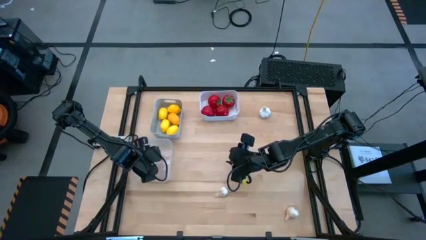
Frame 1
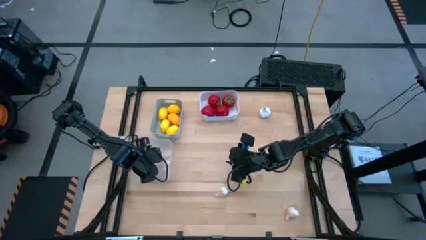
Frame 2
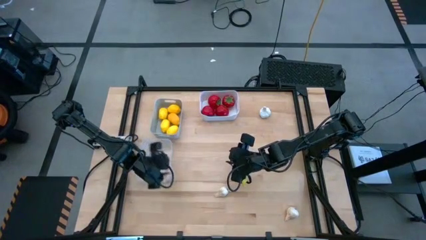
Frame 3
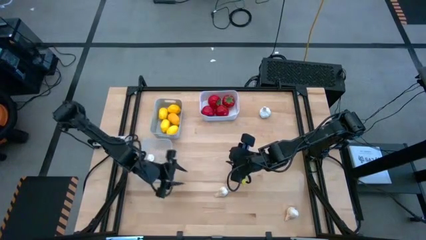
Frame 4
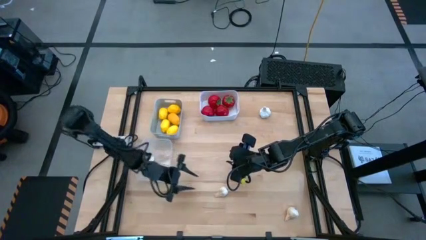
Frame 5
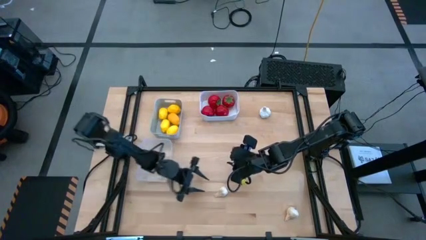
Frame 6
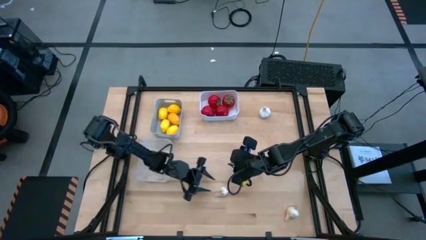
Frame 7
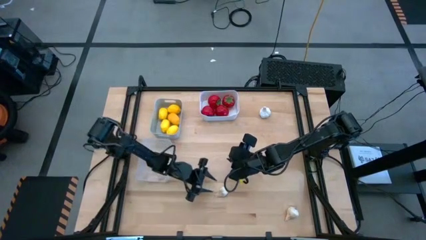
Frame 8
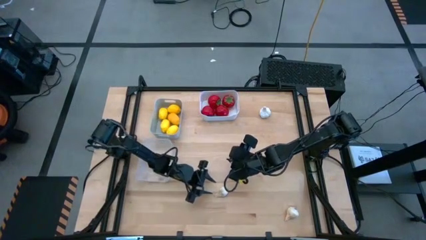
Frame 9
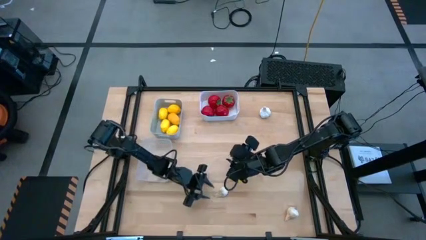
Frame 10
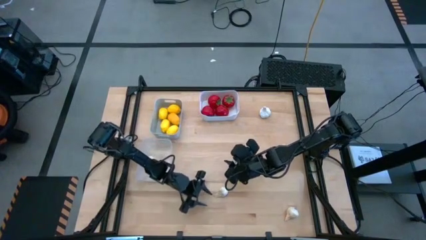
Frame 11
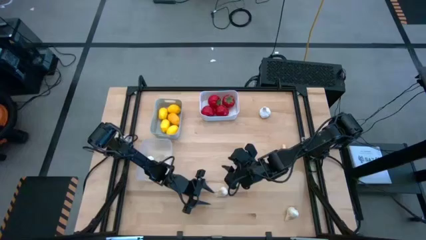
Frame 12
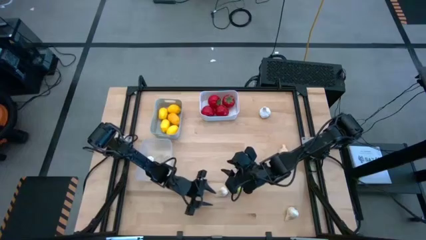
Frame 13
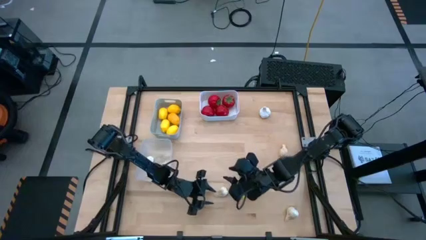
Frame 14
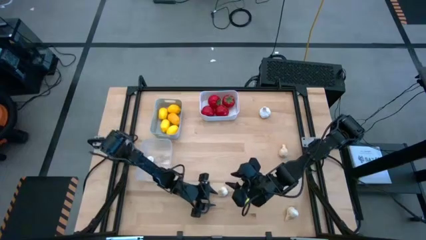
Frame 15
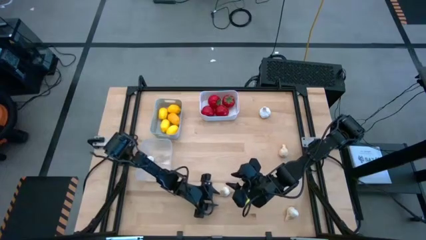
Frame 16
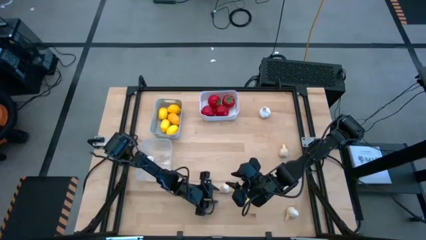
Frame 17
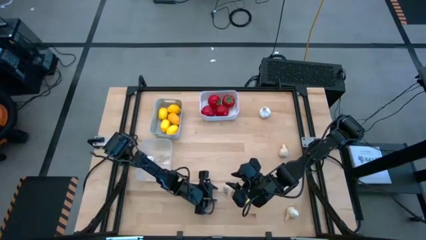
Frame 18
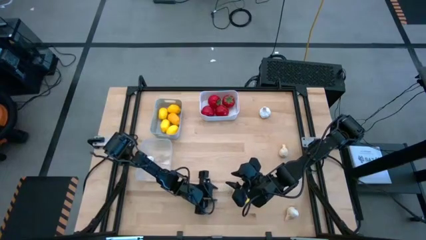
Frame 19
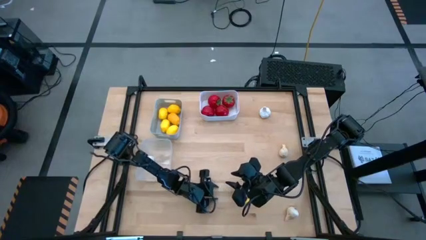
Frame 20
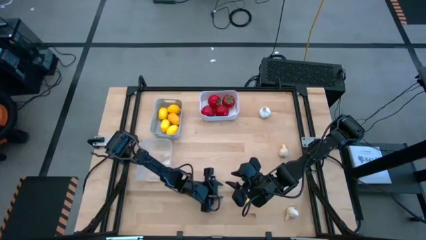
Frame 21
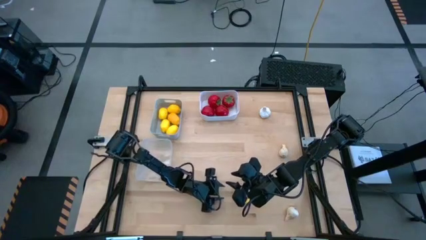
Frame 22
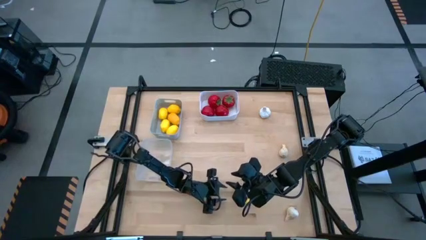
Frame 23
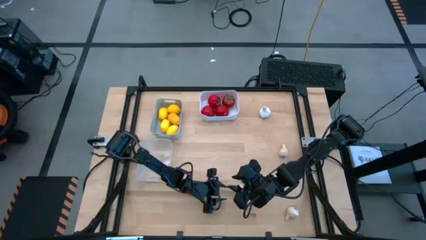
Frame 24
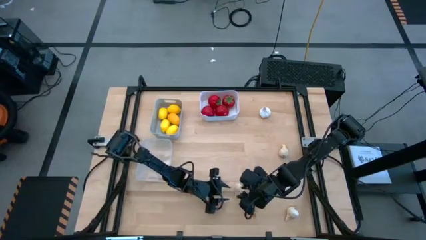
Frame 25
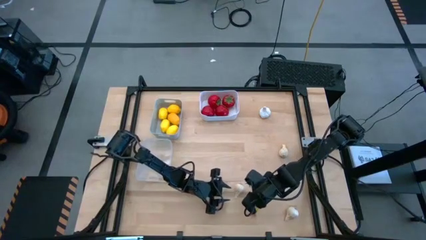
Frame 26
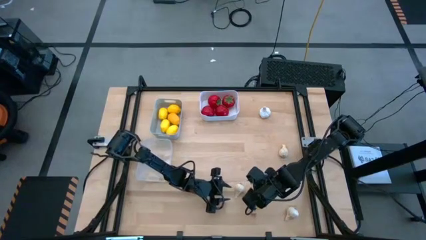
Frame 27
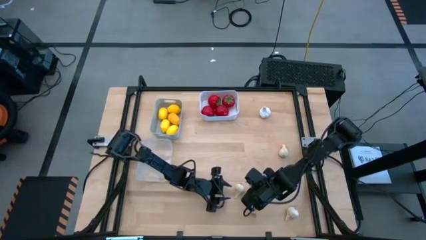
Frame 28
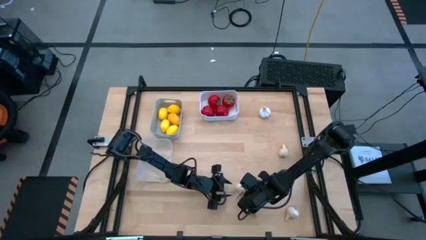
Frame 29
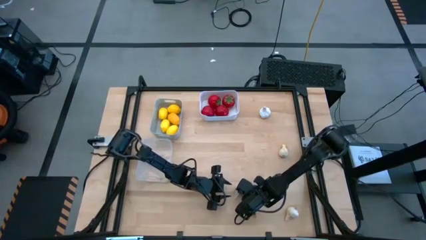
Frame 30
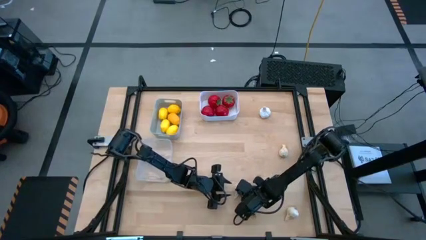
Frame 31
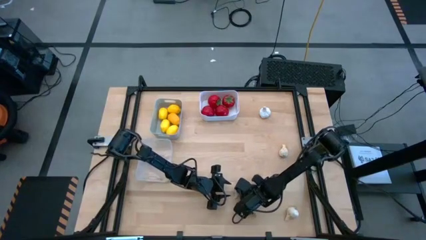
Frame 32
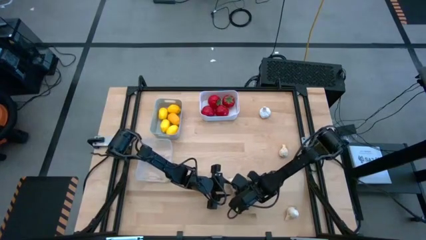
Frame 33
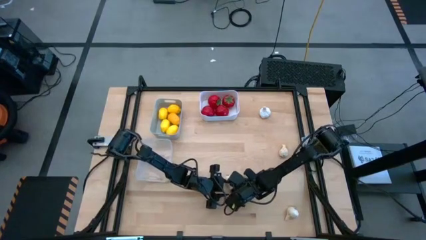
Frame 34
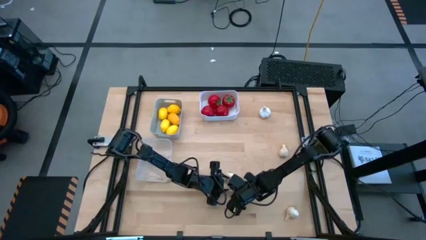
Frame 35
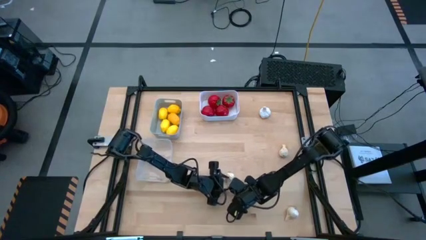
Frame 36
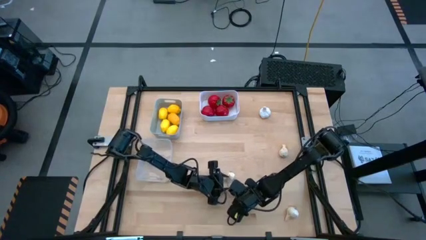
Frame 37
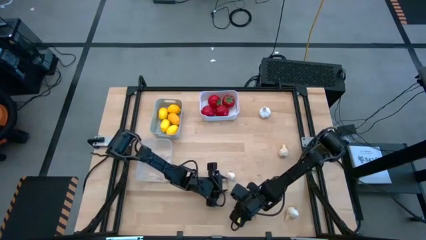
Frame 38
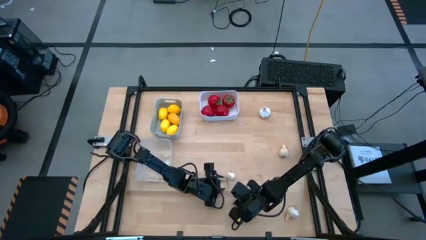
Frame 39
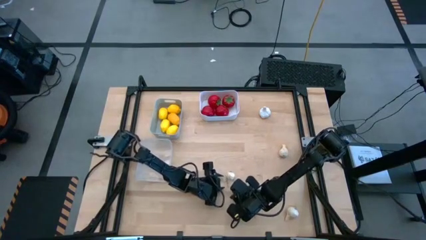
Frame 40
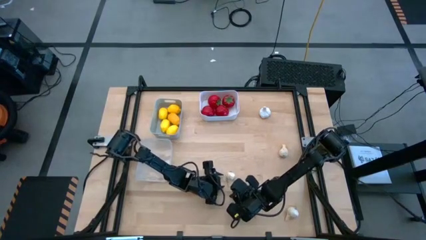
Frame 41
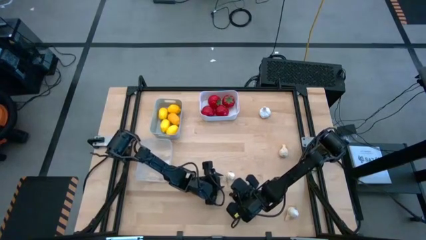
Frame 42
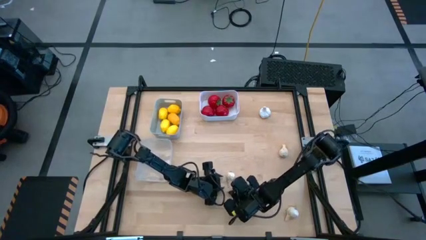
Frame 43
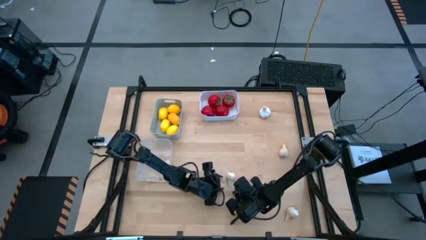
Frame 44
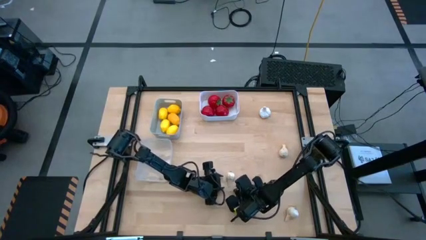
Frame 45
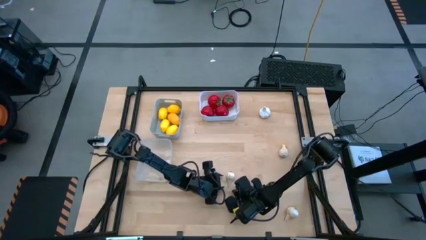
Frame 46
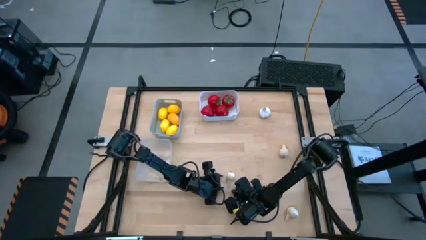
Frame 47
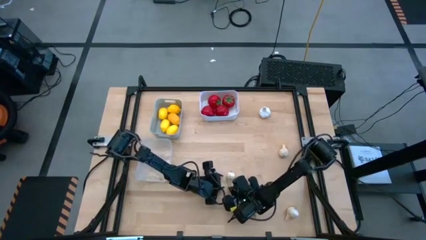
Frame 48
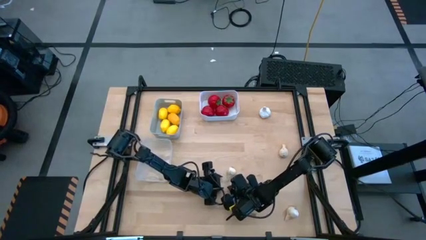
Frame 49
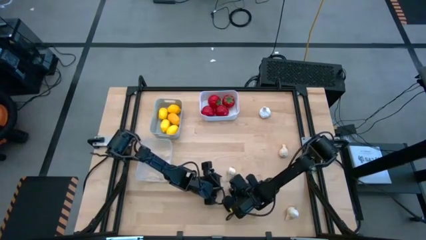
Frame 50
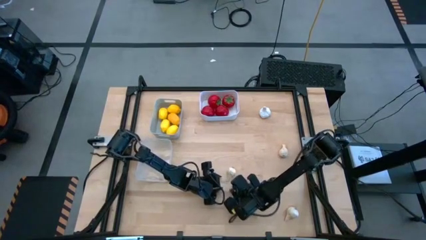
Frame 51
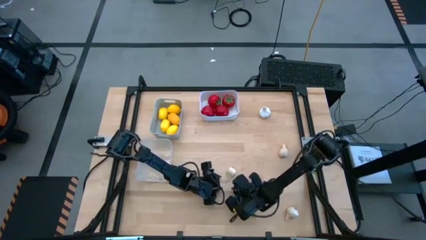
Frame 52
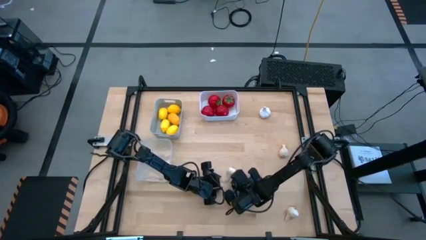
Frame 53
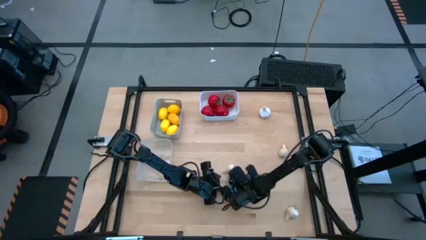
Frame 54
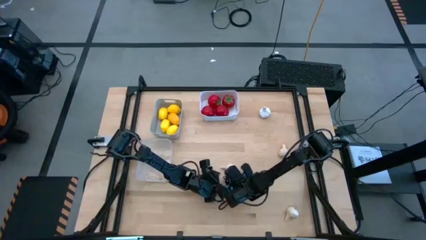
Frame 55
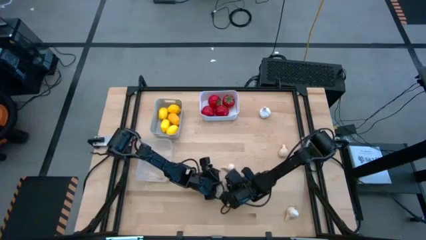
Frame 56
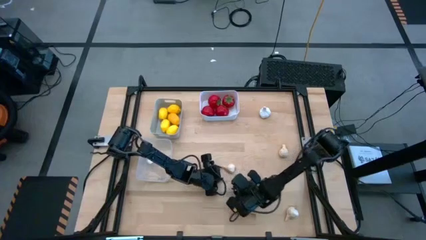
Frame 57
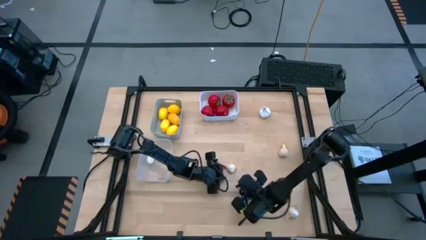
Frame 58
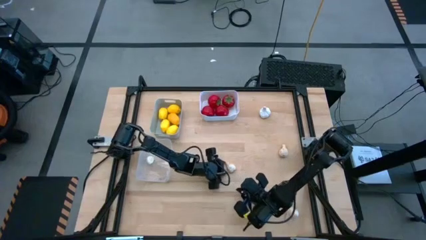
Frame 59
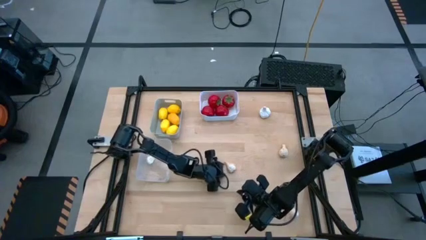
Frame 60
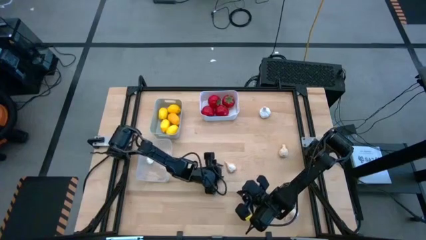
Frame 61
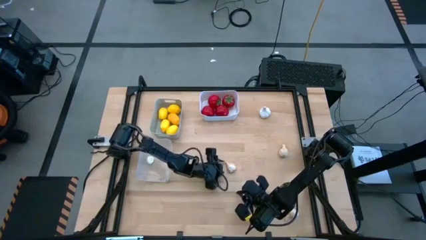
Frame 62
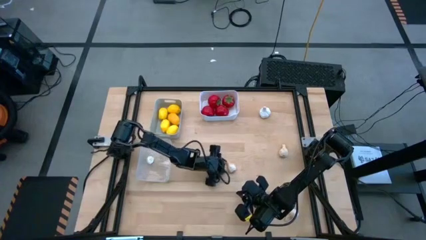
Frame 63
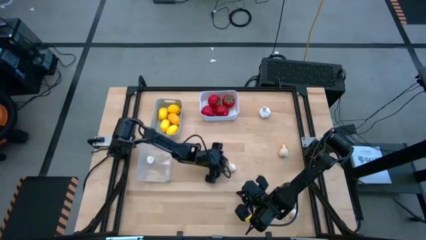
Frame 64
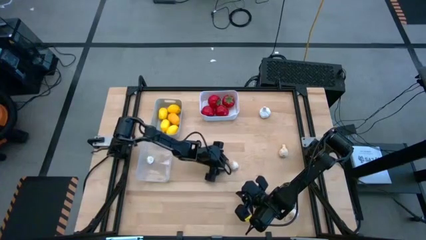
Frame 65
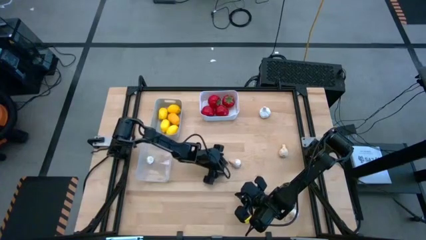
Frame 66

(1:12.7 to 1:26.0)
Task: Sort produce into baskets
Put the white garlic into the transparent bin

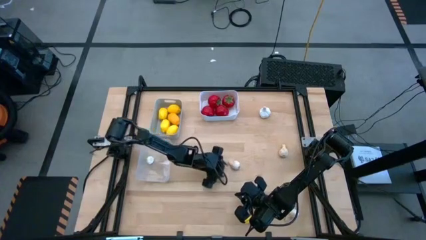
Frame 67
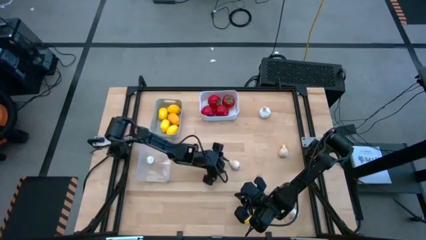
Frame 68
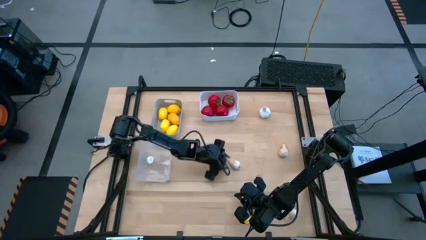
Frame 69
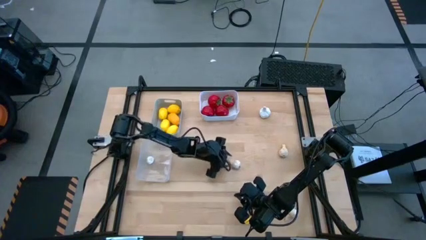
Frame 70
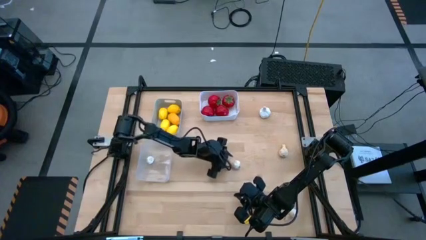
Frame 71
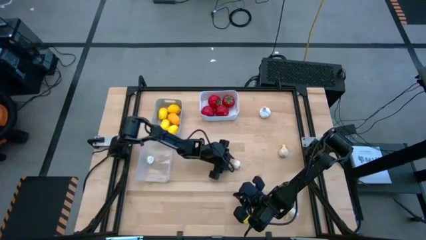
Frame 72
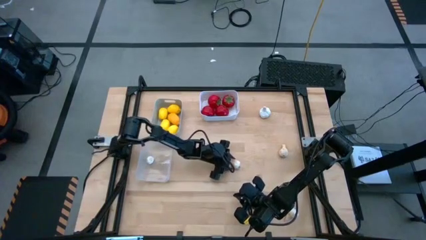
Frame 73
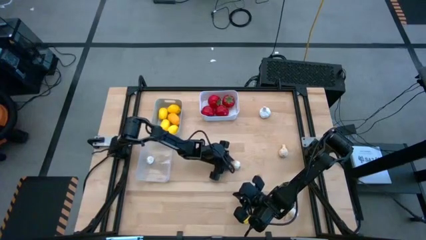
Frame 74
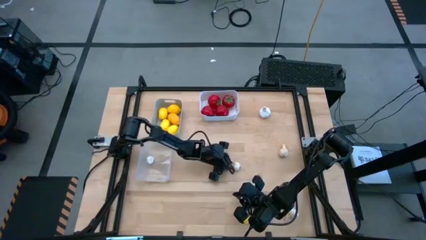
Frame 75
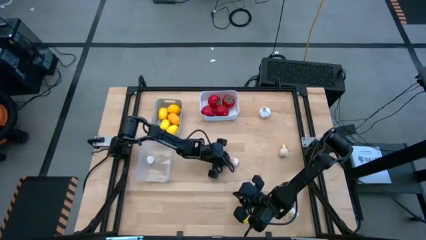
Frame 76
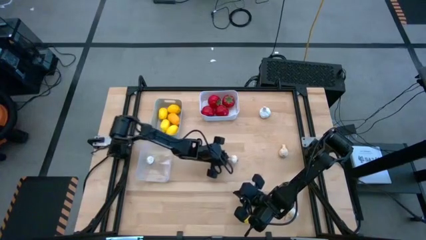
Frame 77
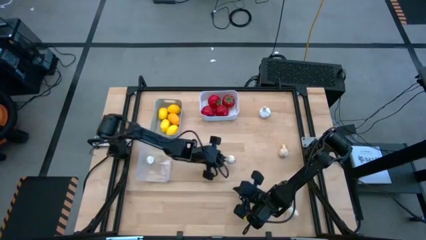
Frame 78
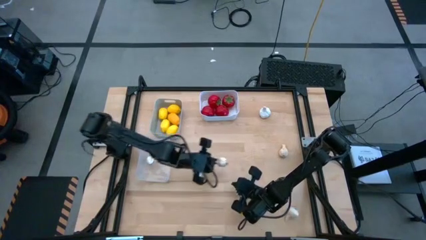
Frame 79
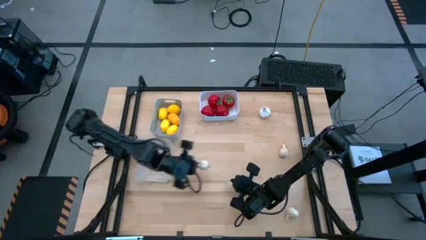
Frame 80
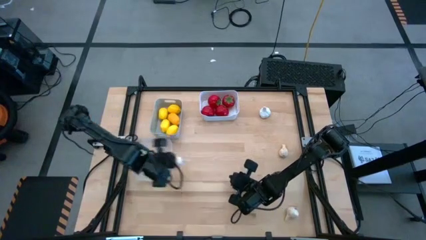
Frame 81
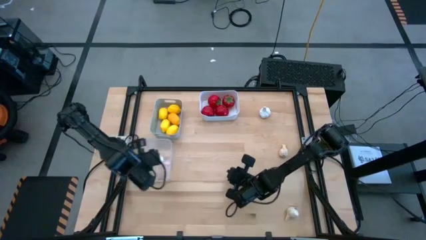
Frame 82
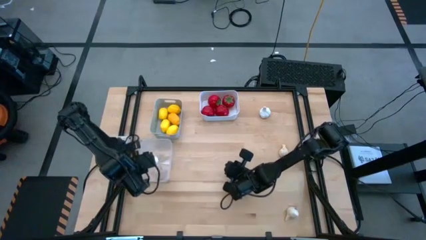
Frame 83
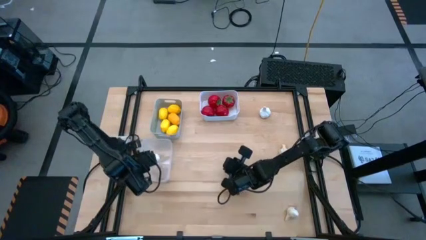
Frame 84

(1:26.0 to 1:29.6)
Put the white garlic into the transparent bin
